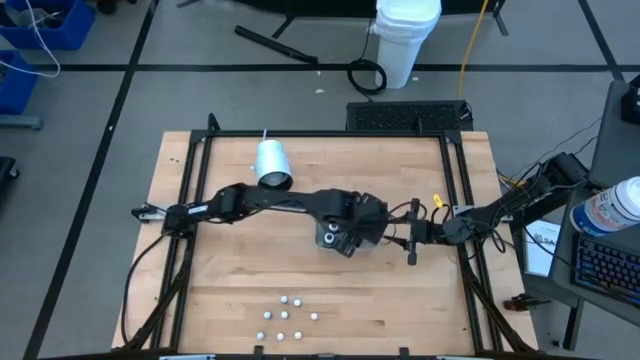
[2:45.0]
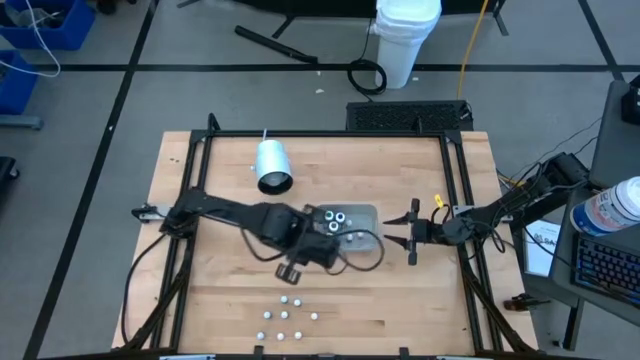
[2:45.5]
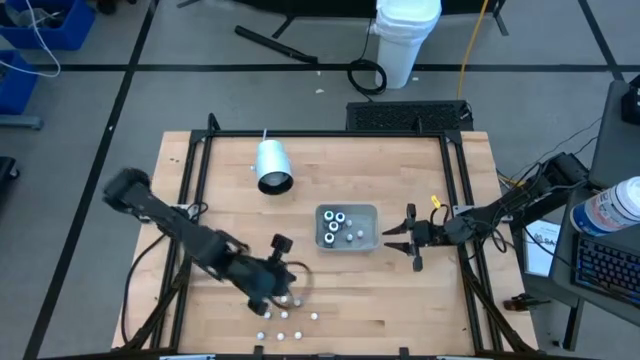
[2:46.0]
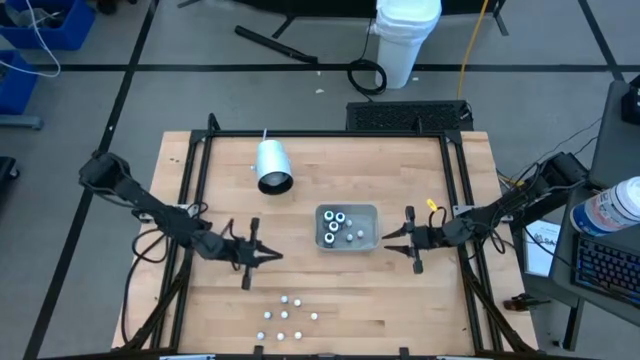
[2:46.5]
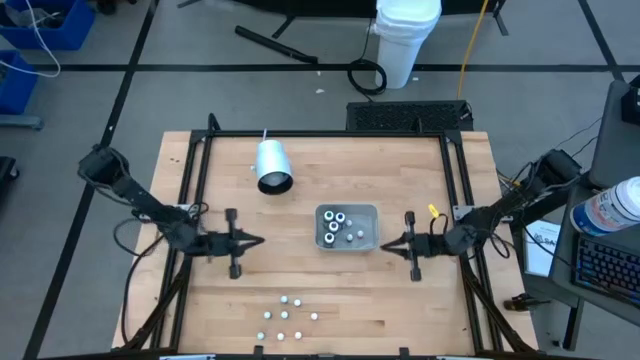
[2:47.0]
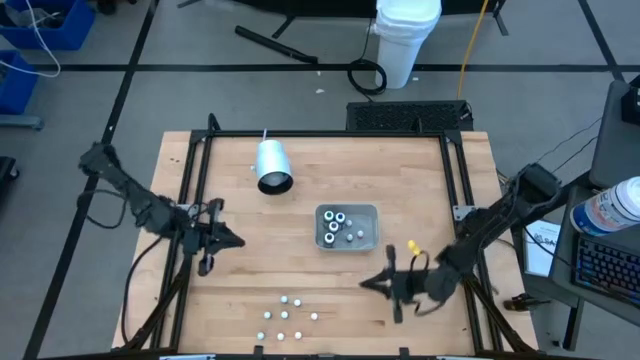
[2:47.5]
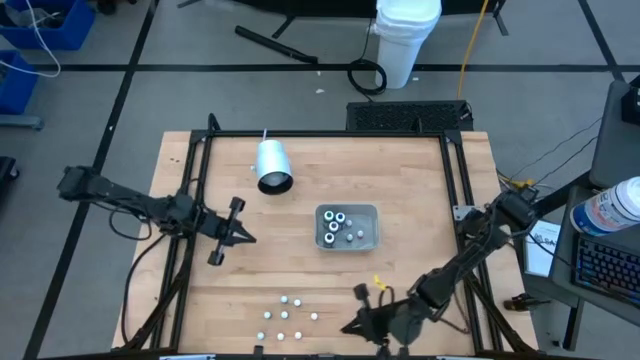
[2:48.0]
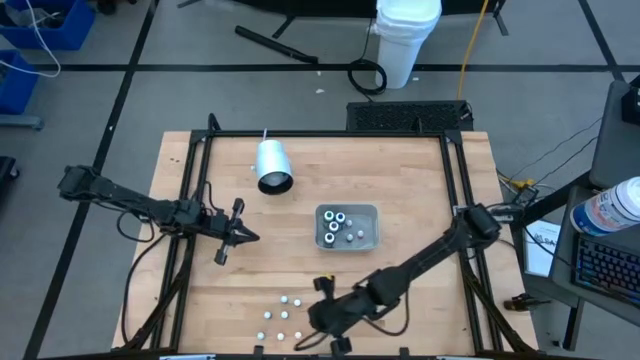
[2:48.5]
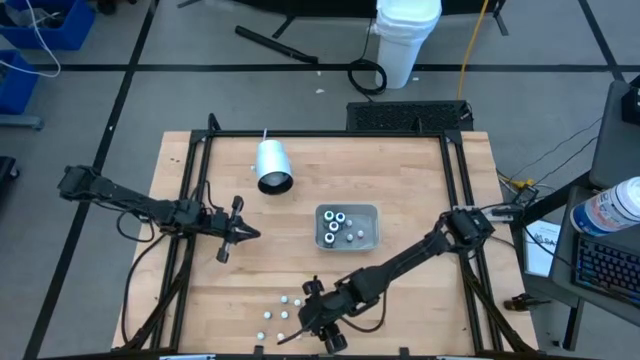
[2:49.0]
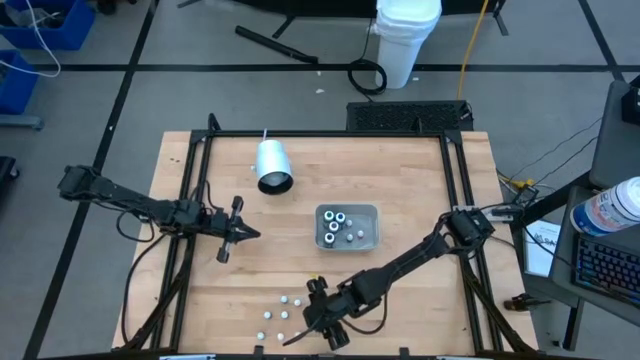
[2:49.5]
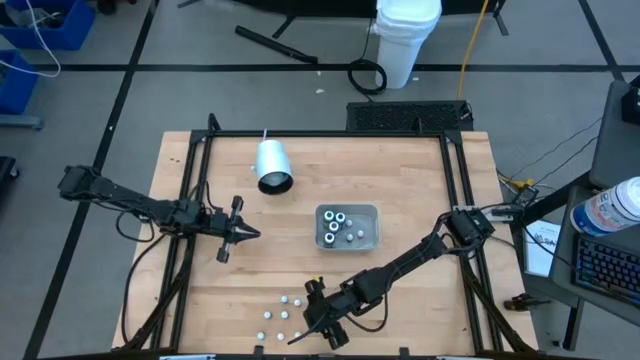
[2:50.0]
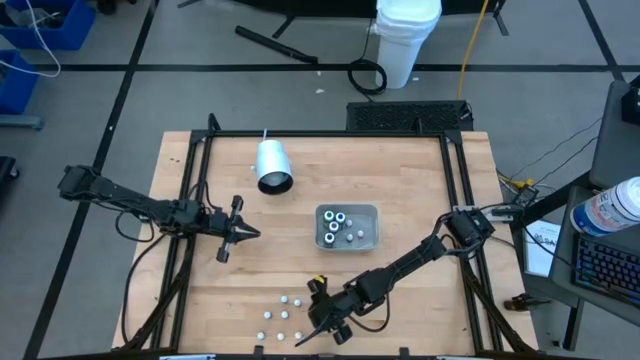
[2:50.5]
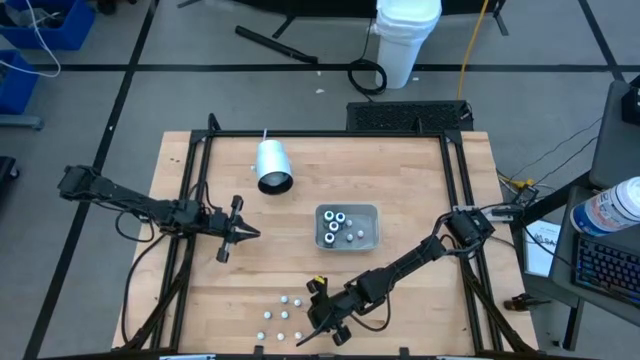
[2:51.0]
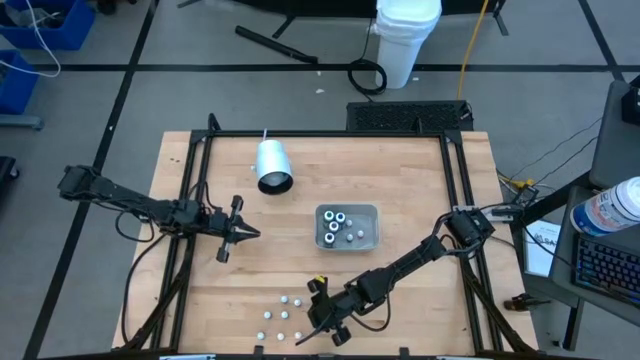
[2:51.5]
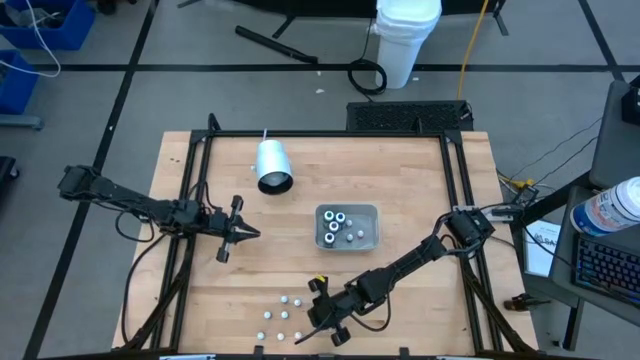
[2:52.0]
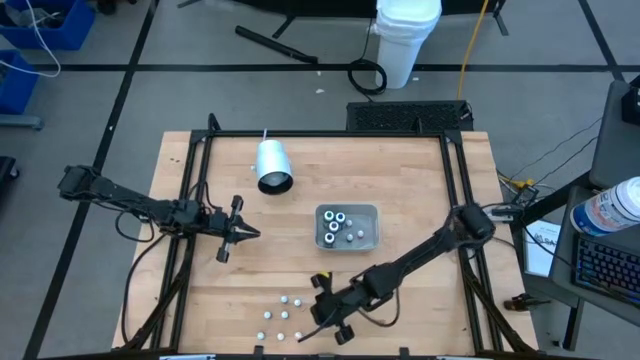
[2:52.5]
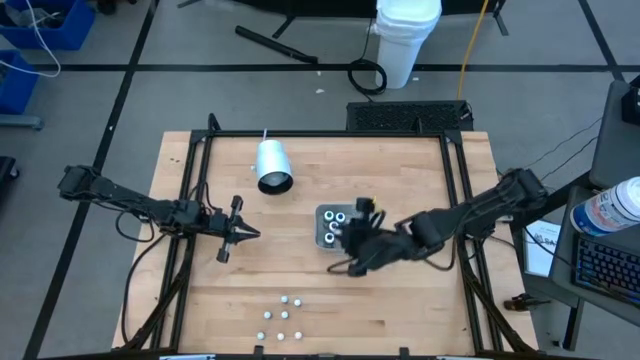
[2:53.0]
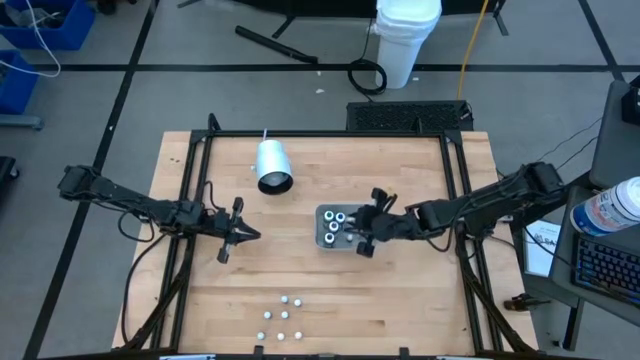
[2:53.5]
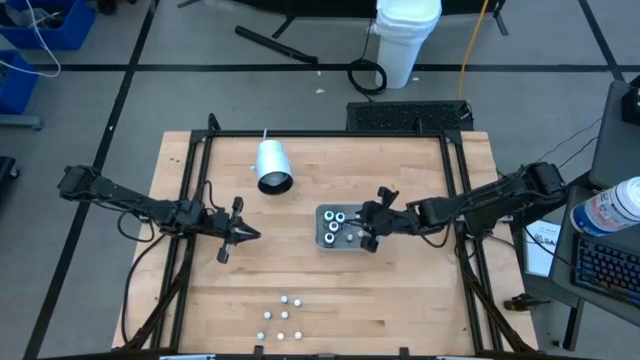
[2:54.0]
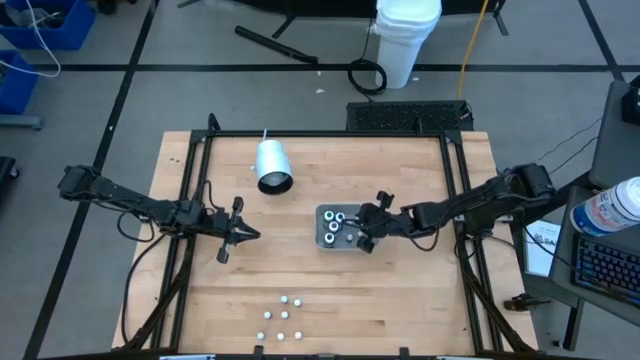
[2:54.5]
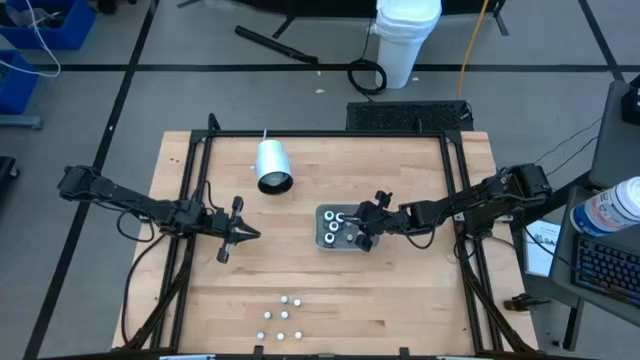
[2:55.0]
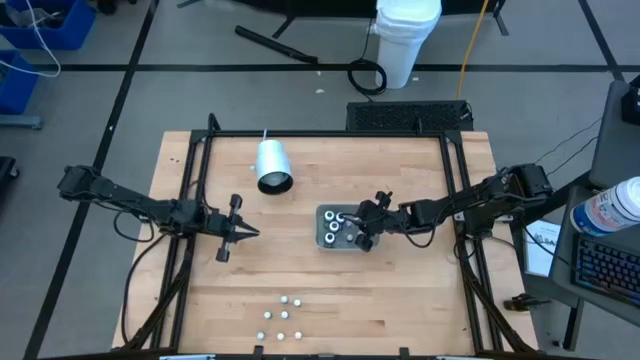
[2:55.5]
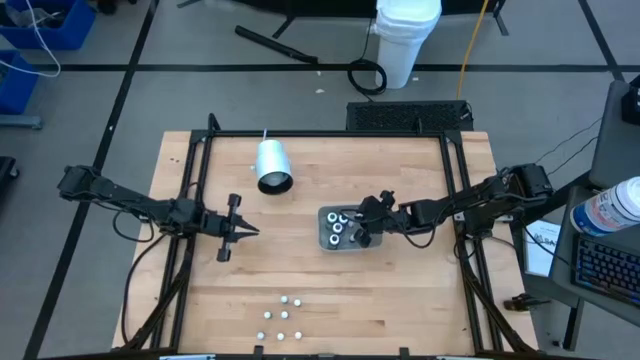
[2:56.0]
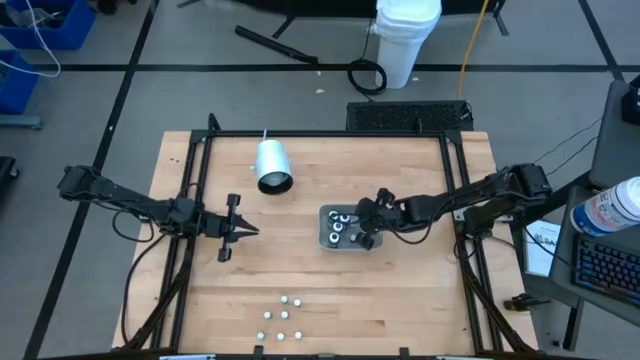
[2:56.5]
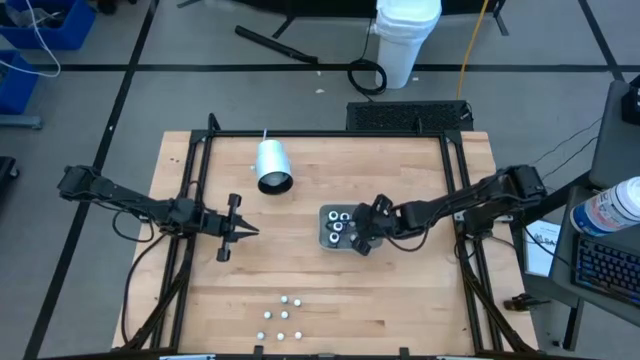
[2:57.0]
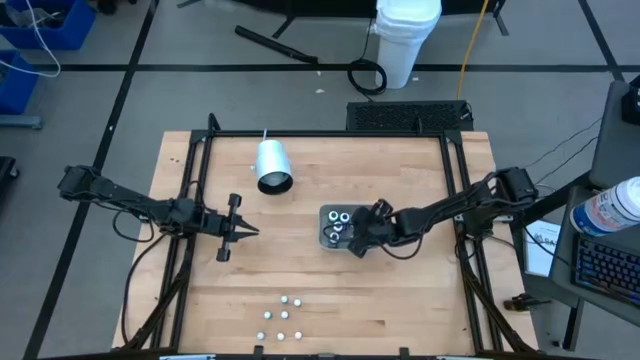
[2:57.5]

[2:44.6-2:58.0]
Task: Pick & Place food coloring
Put the top right small orange food coloring bottle into the white bin

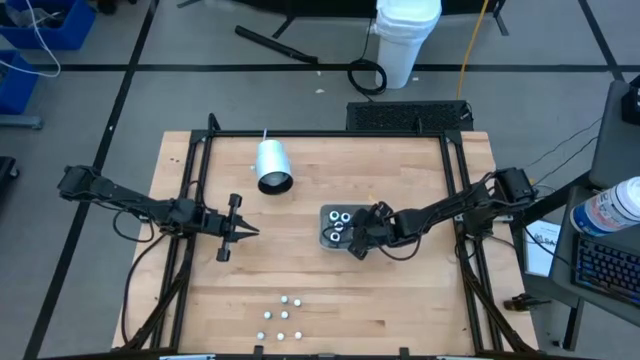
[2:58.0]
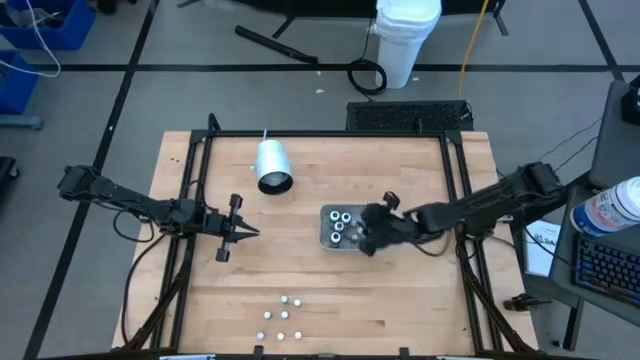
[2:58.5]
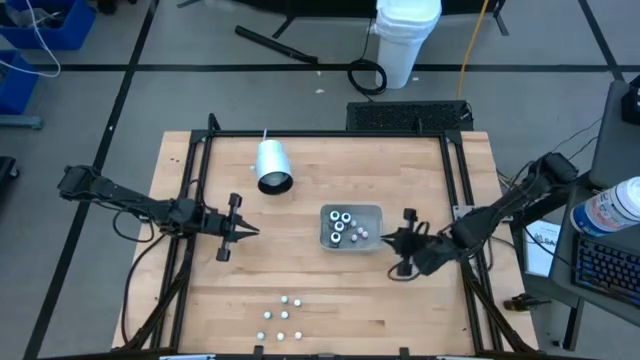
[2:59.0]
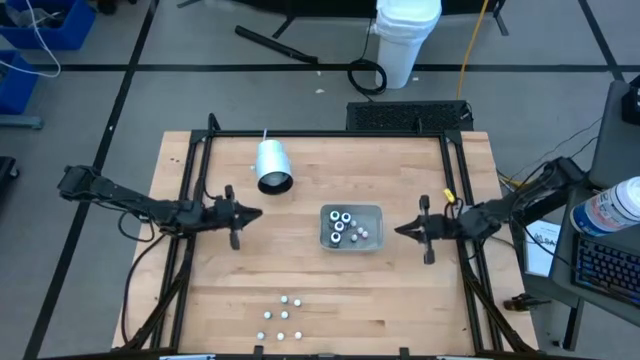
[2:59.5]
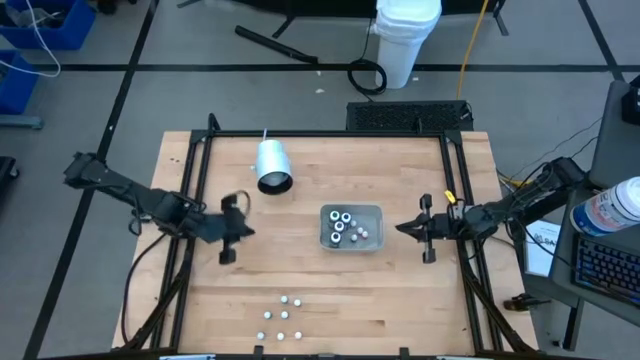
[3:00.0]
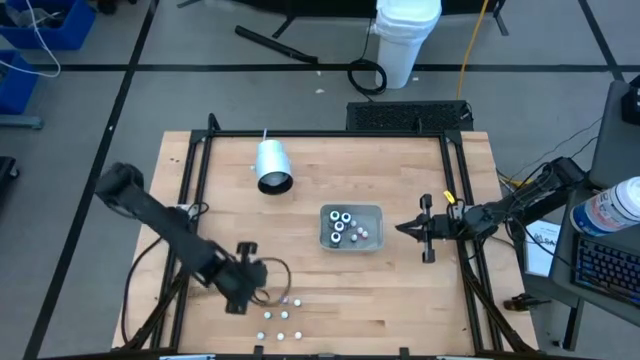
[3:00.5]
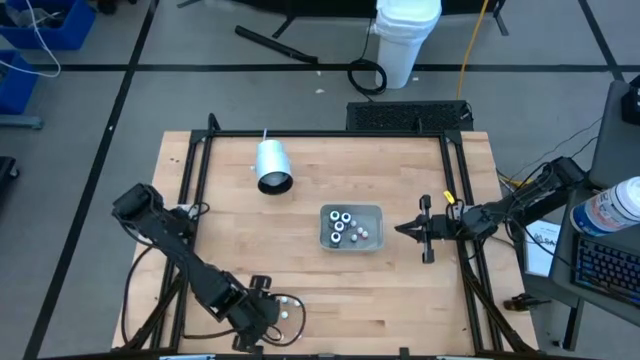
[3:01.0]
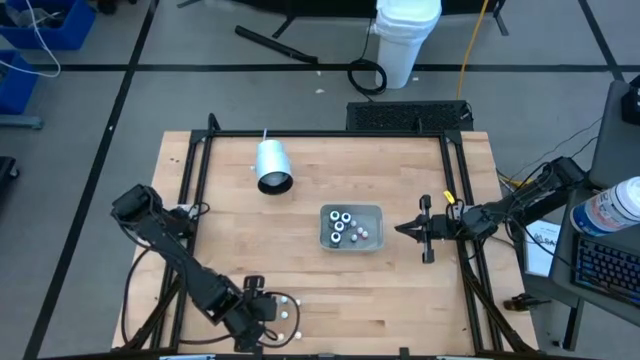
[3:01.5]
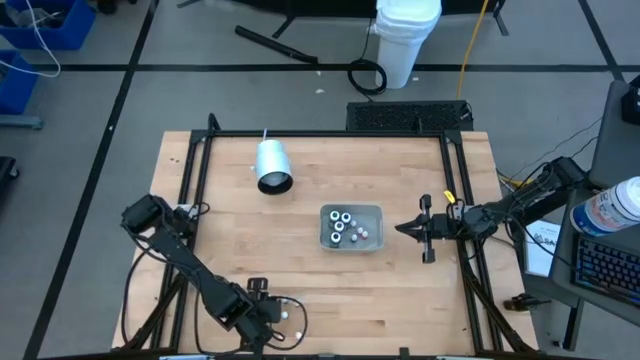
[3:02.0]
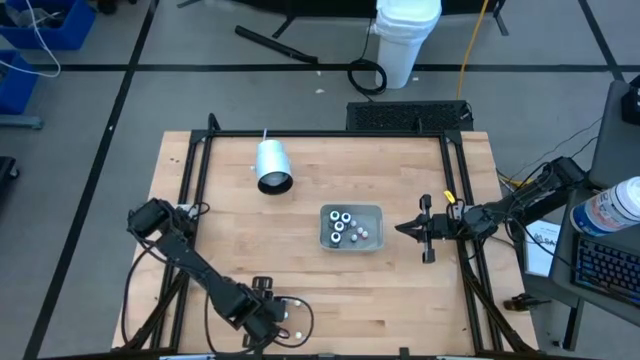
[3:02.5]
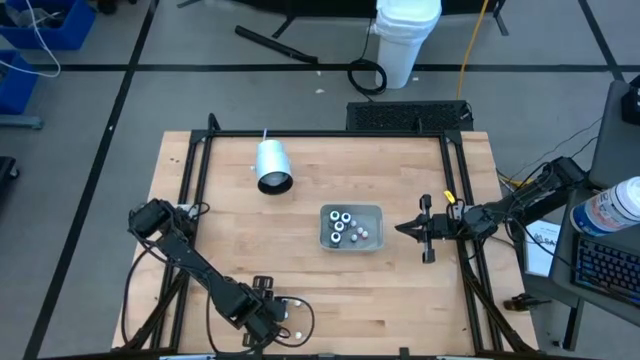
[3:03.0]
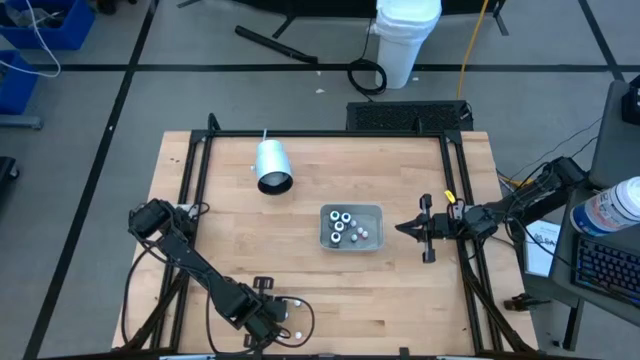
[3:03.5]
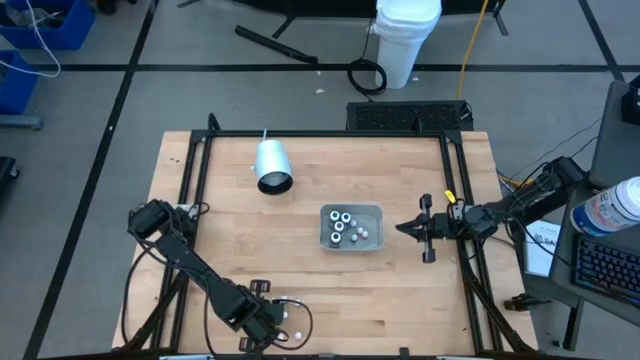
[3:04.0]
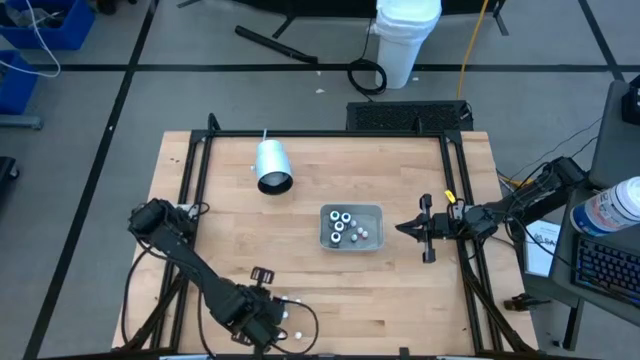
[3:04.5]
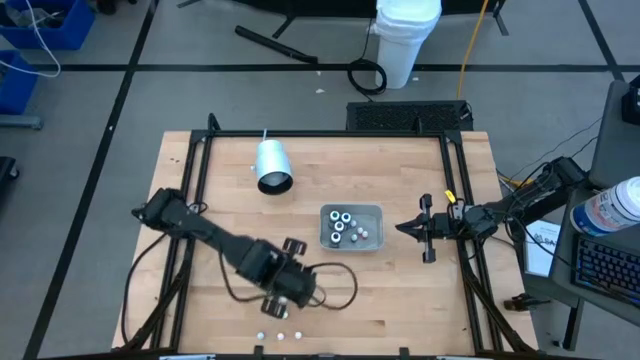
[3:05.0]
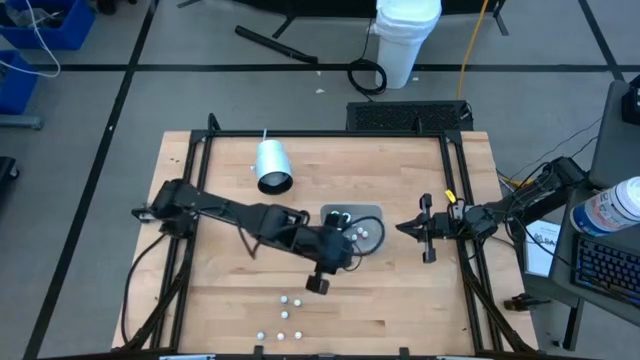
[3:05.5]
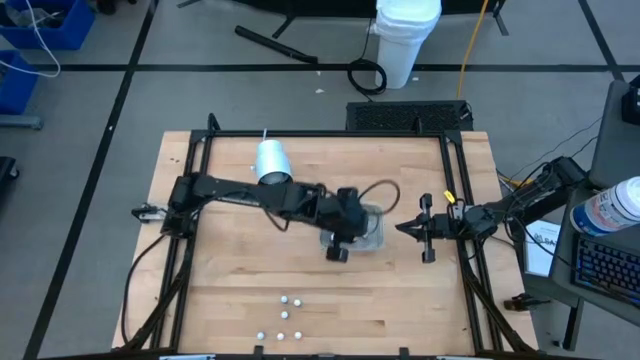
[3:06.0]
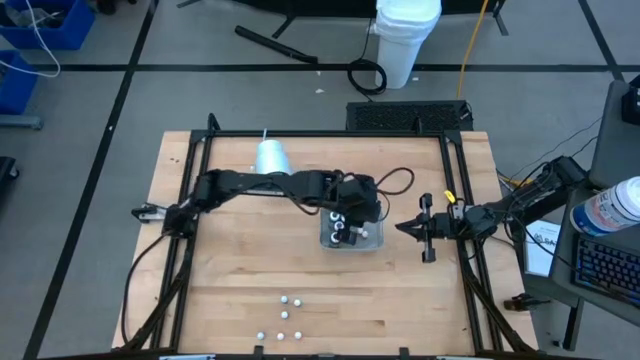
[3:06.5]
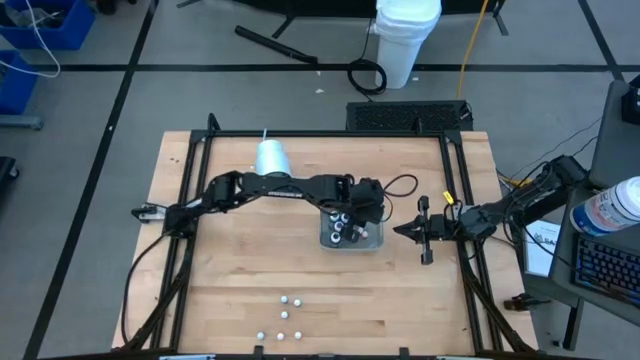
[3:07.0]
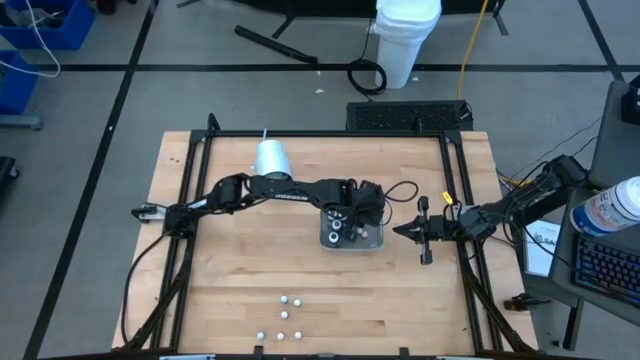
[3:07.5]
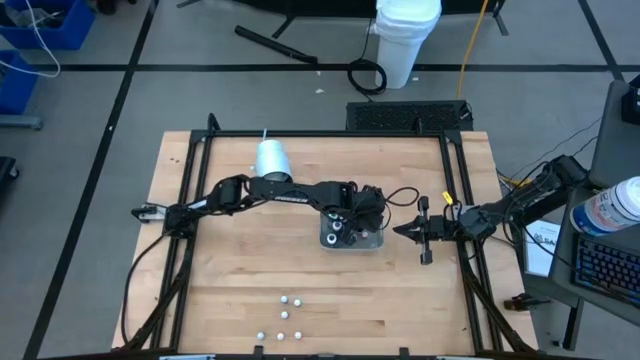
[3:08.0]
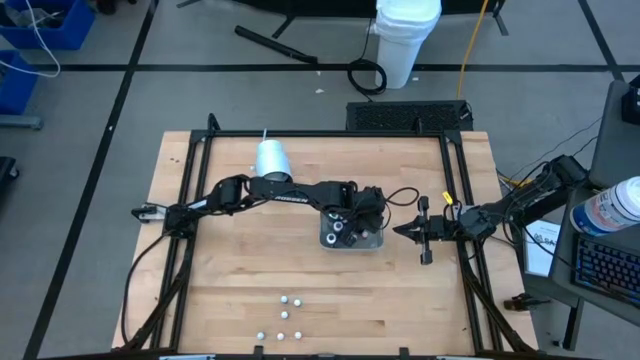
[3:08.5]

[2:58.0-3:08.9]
Put the bottom small blue food coloring bottle into the white bin
